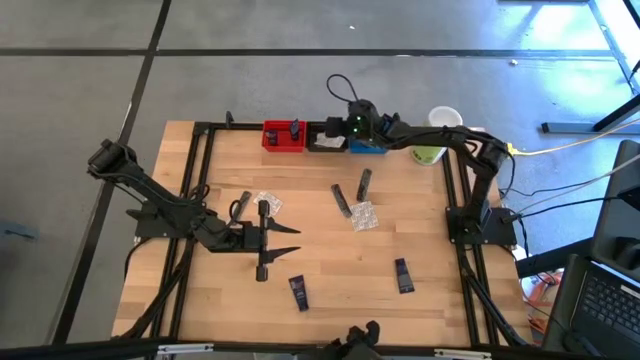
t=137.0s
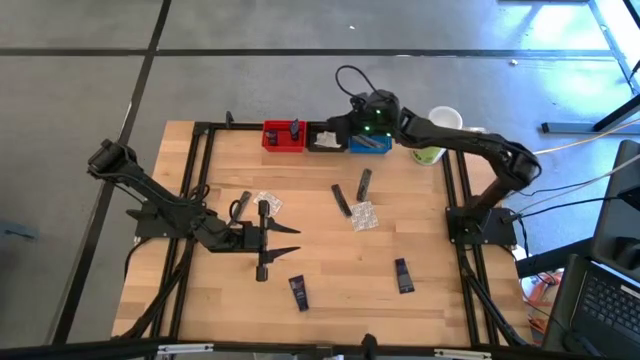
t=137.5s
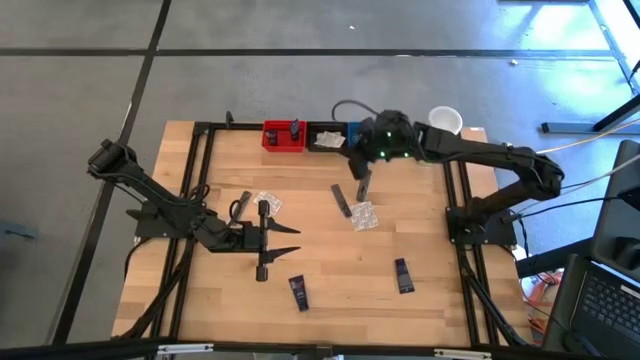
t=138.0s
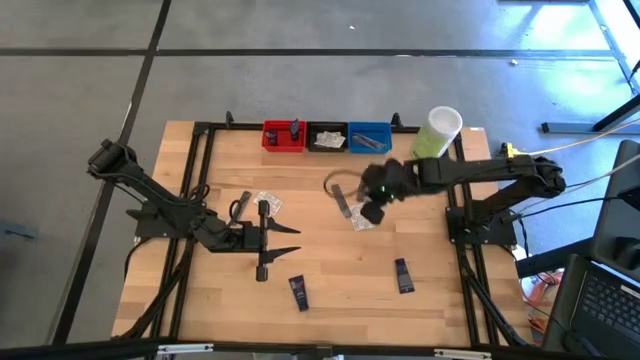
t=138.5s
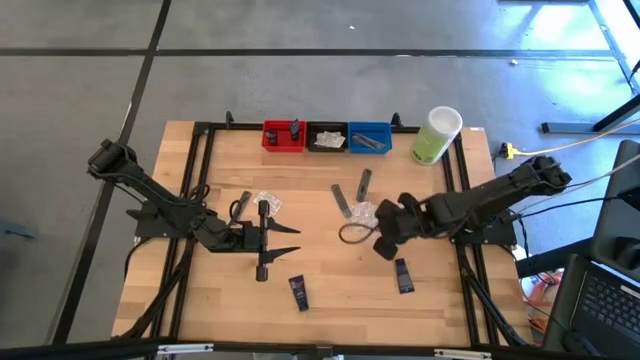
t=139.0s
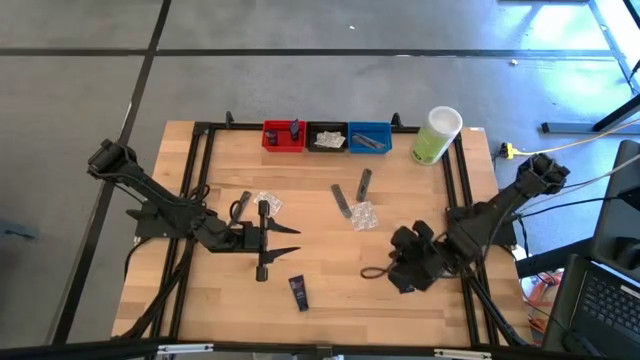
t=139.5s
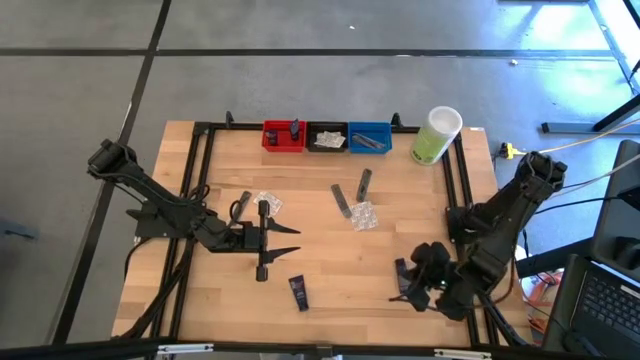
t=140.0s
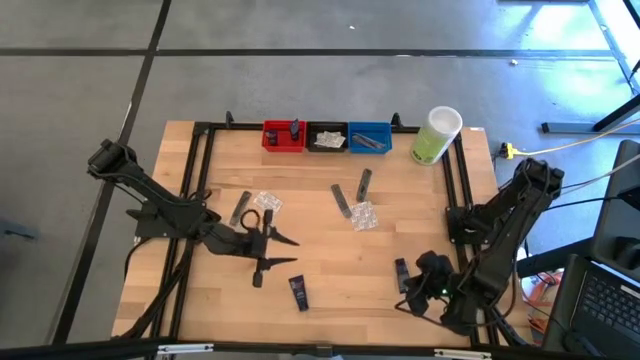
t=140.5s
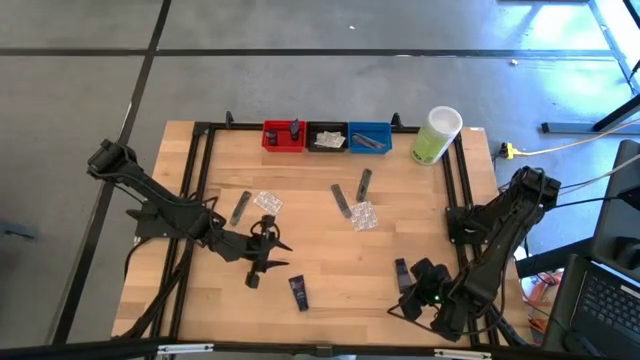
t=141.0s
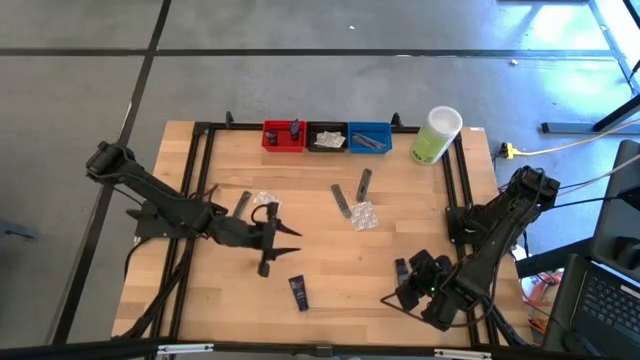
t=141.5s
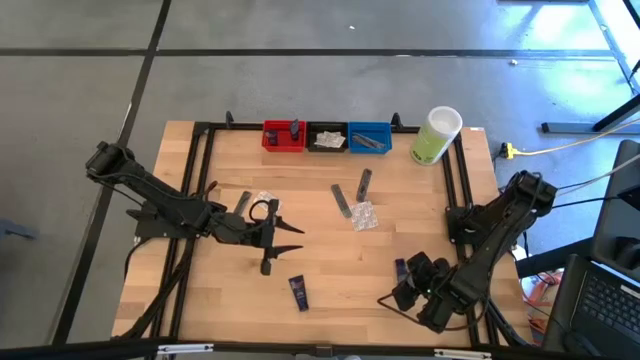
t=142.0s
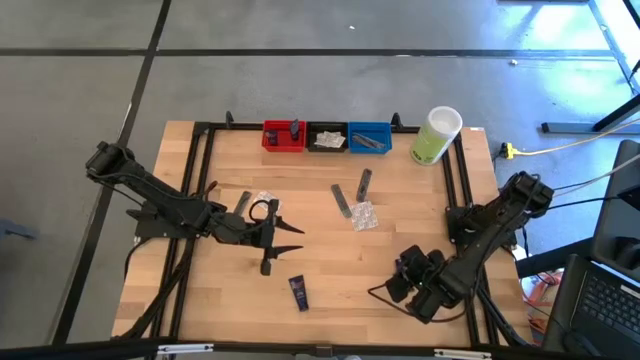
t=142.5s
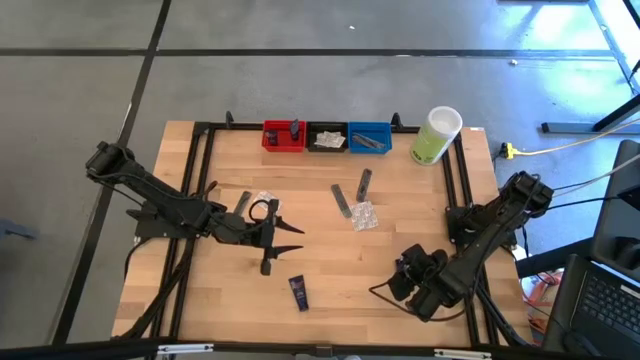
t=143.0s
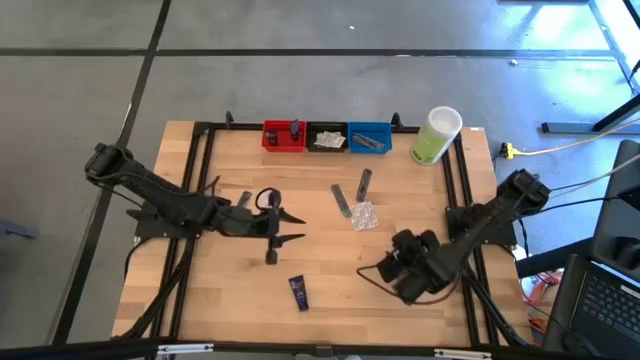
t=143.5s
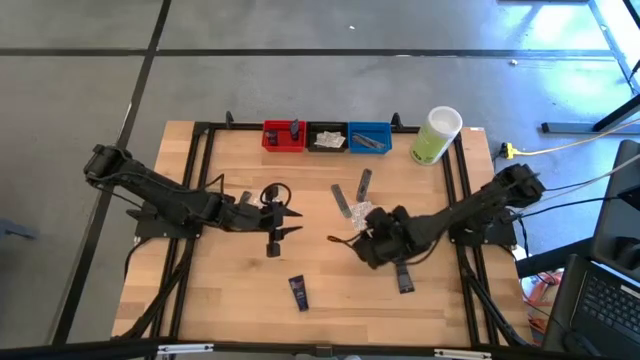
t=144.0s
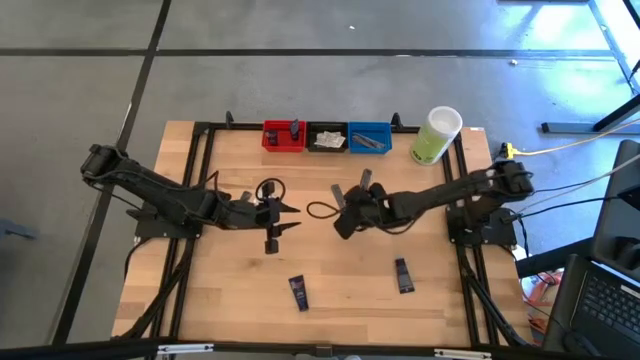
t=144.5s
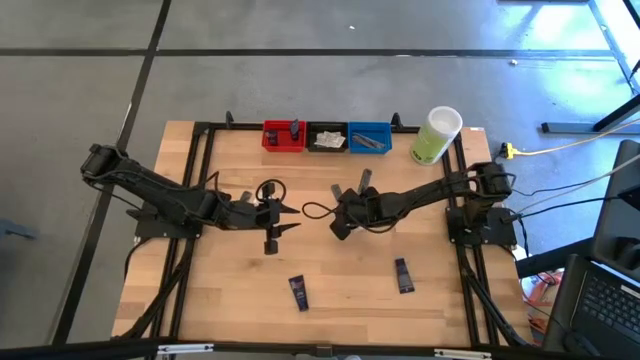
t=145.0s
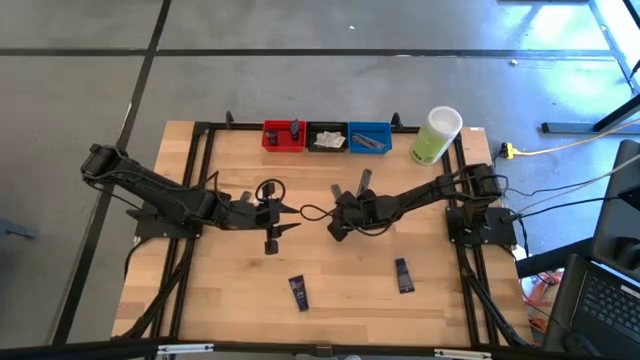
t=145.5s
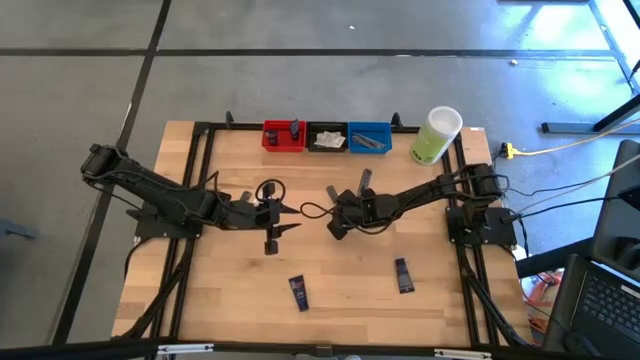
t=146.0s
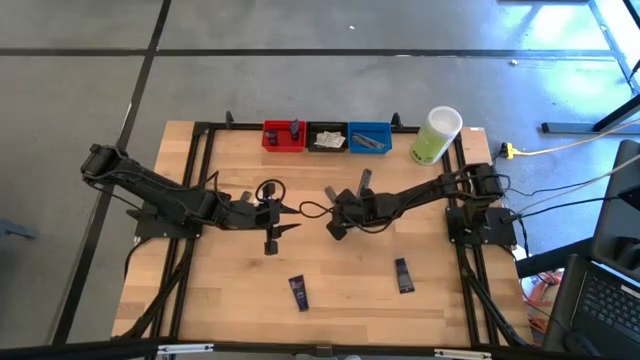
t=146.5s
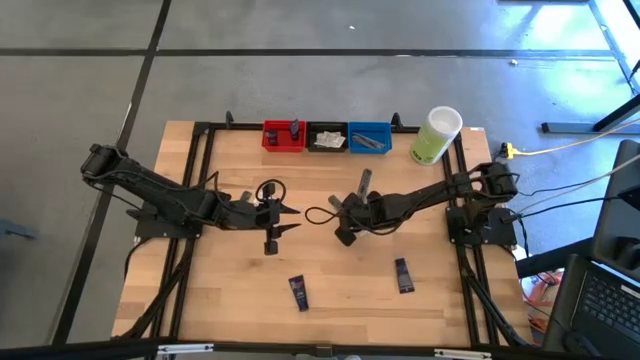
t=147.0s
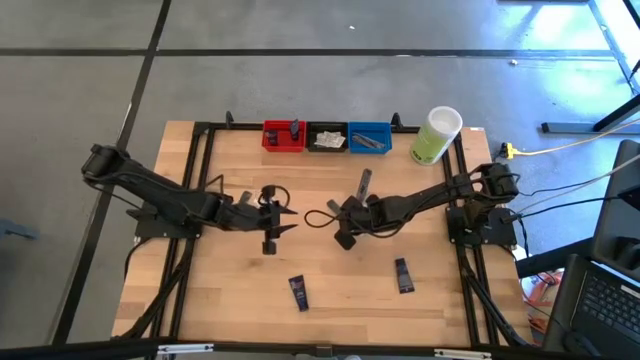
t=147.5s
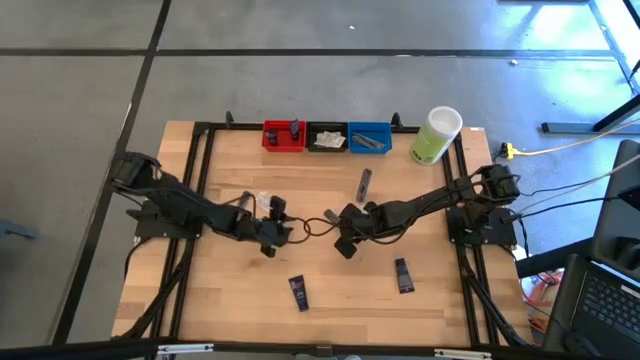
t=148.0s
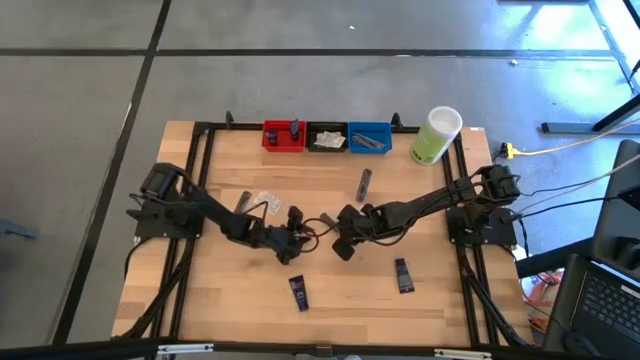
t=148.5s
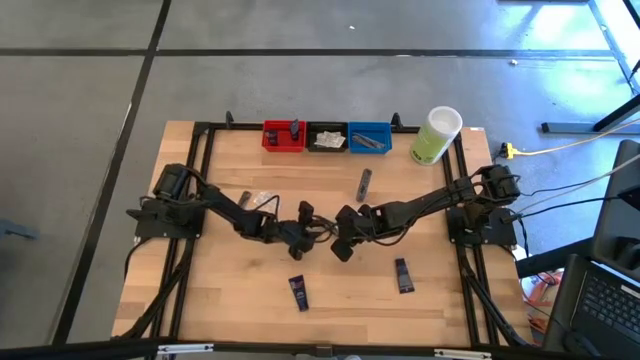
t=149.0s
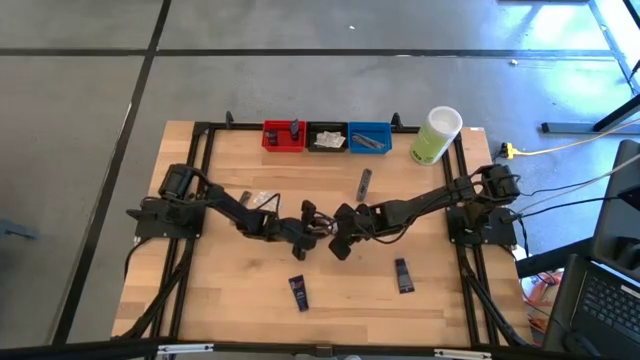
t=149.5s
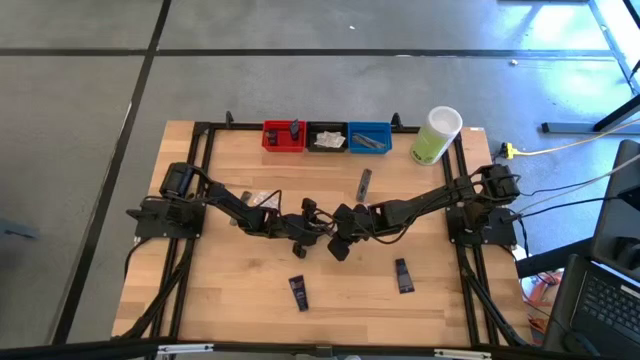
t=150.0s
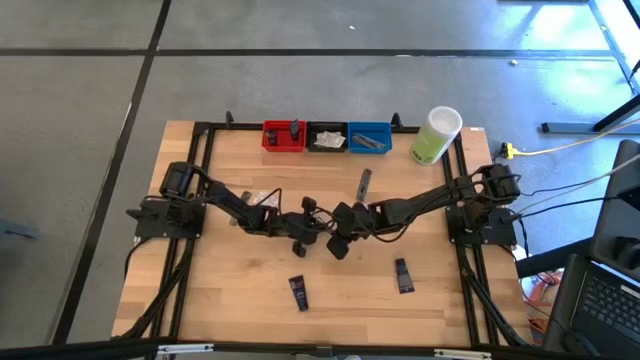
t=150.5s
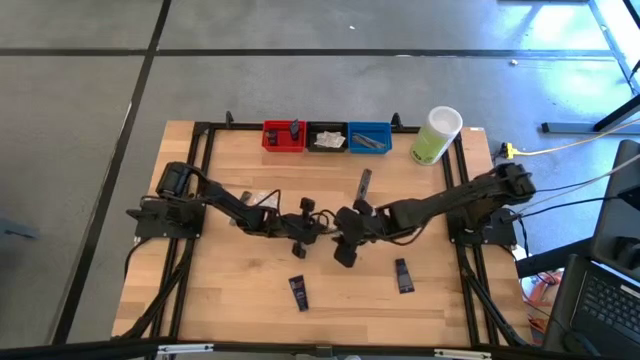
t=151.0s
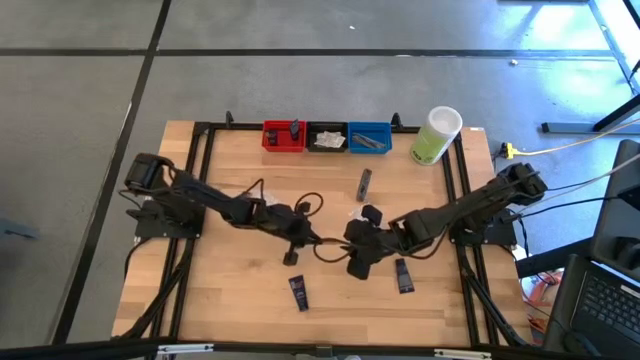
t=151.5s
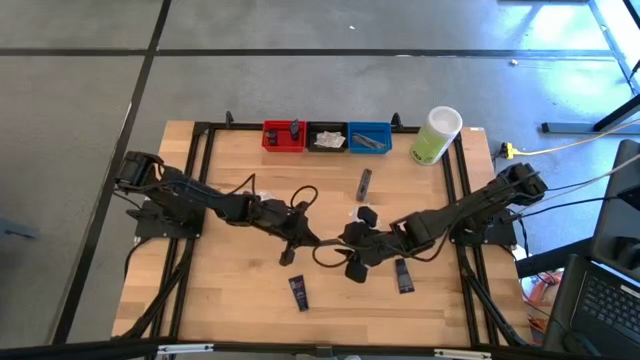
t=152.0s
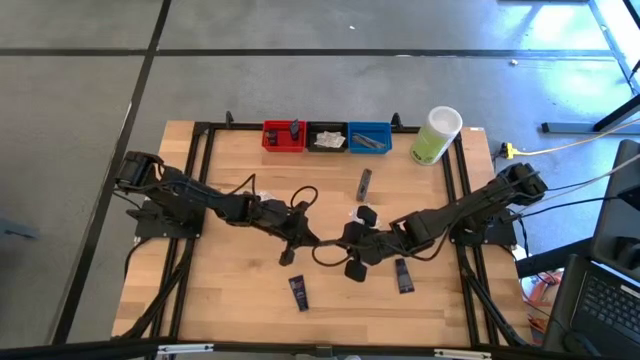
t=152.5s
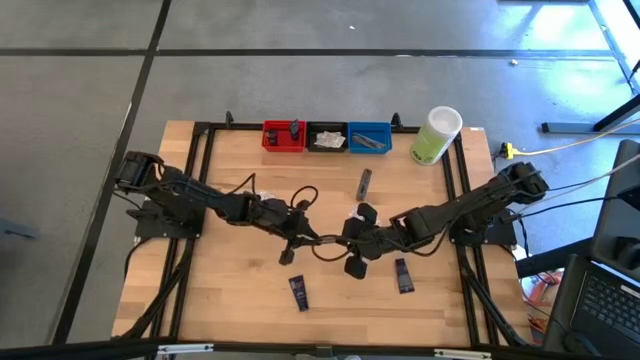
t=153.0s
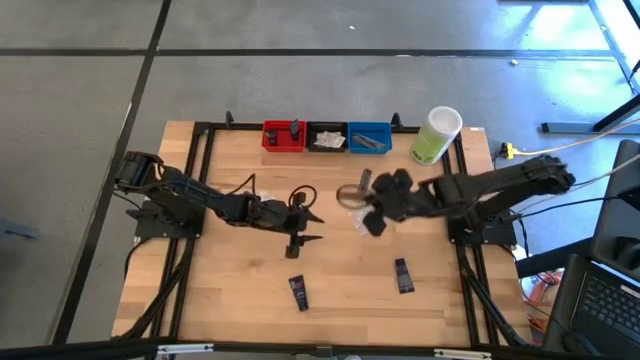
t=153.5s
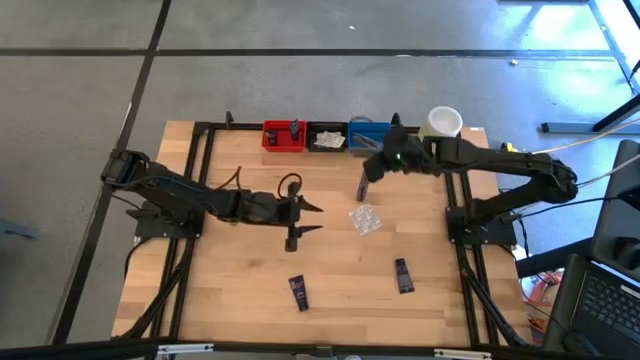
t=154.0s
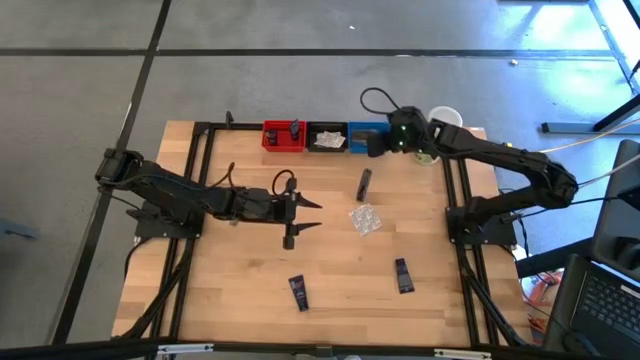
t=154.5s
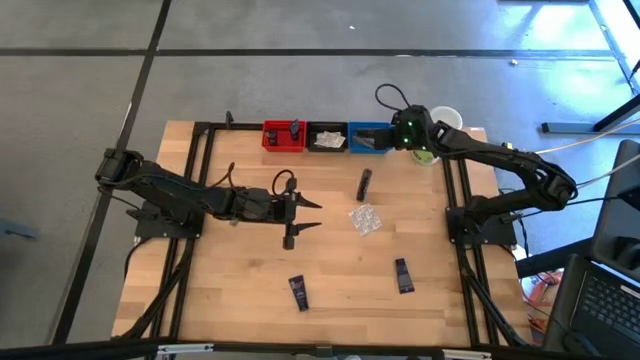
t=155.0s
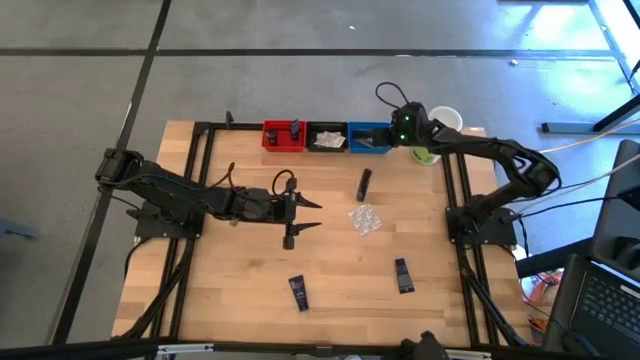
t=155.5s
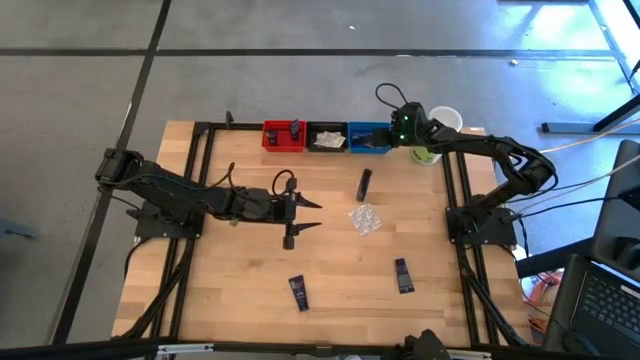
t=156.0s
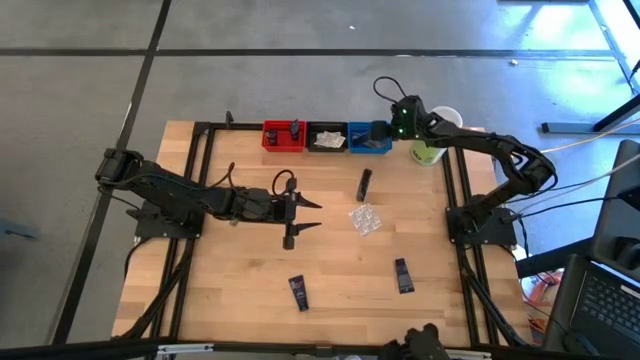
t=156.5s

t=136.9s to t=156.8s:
Task: Pick & Place Travel size toiletries
Put the black comb into the blue bin

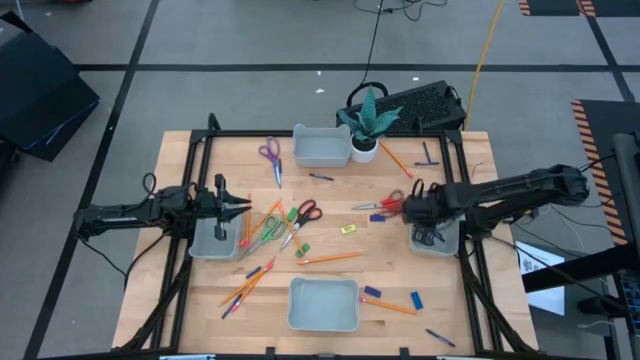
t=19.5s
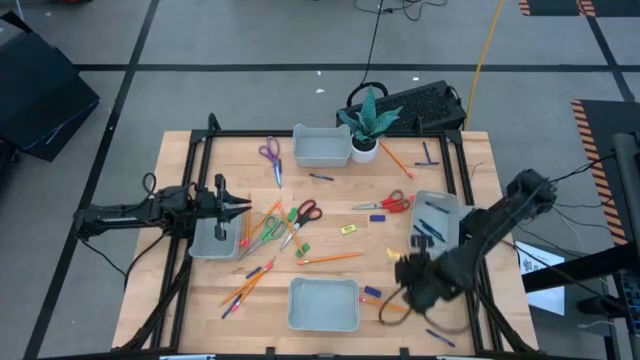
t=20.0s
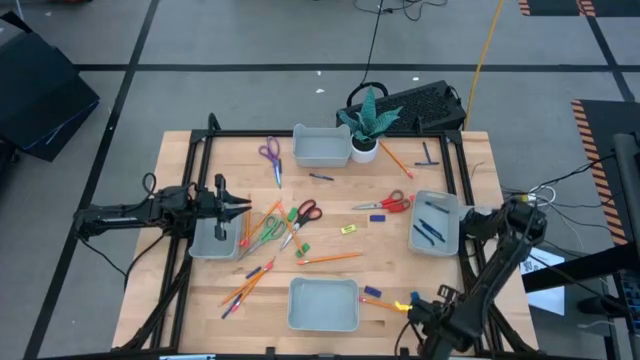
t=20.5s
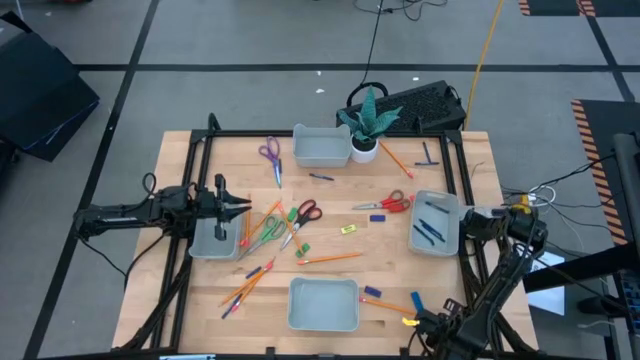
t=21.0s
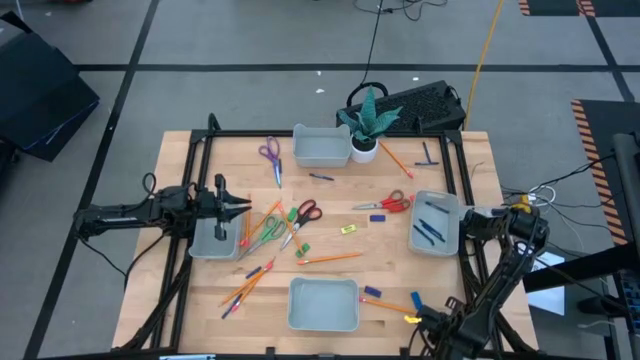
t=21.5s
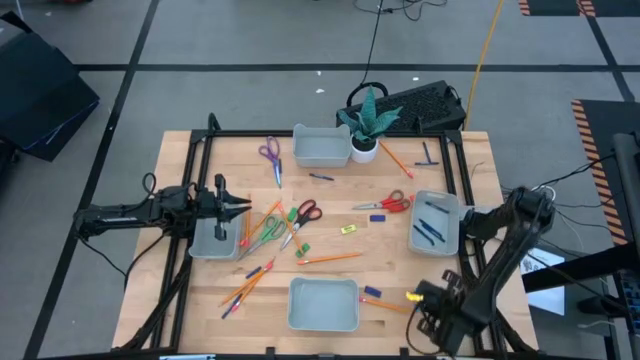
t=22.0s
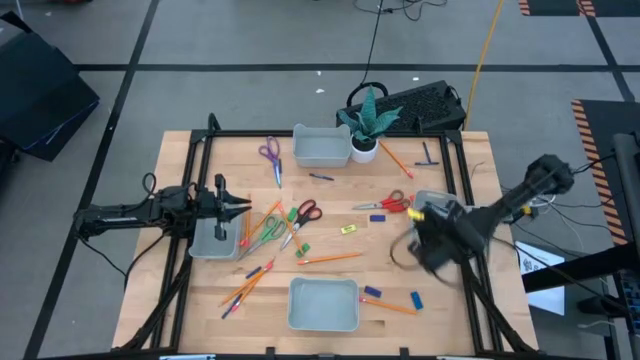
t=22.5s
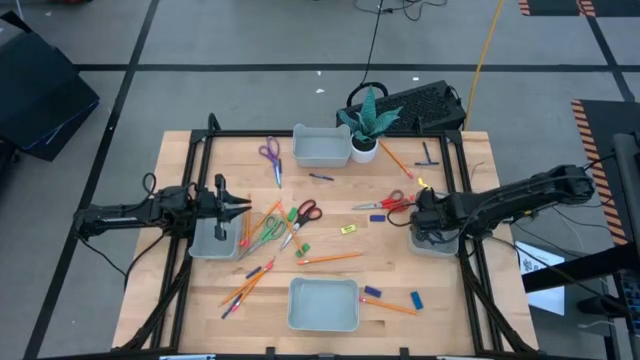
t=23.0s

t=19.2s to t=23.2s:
Task: Sort crayons/erasers/pens/pencils in bins
Put the blue crayon into the middle right gray bin
